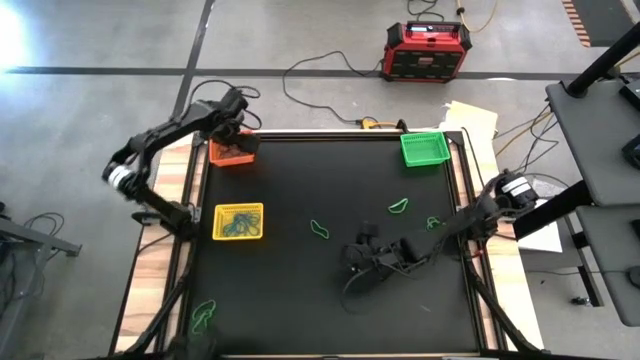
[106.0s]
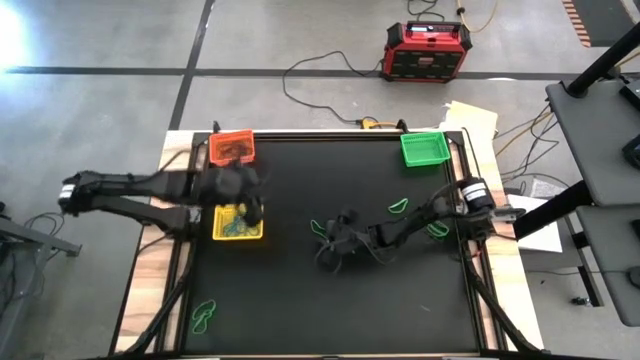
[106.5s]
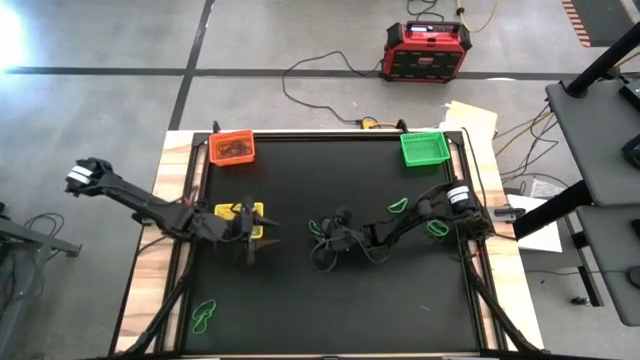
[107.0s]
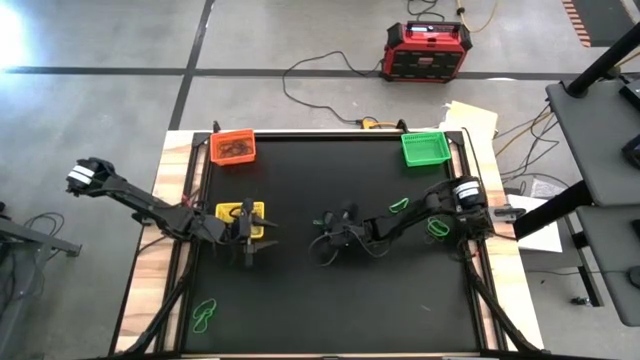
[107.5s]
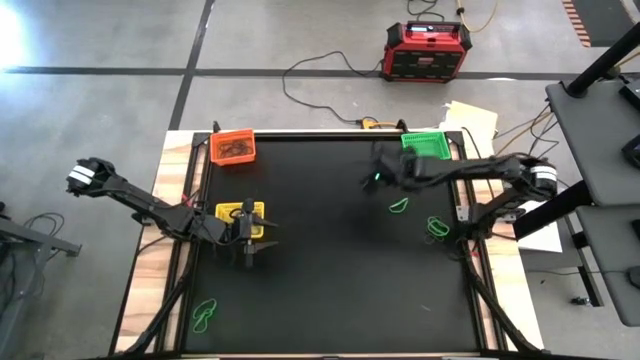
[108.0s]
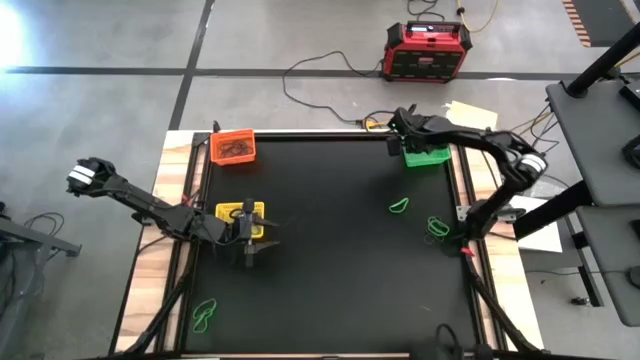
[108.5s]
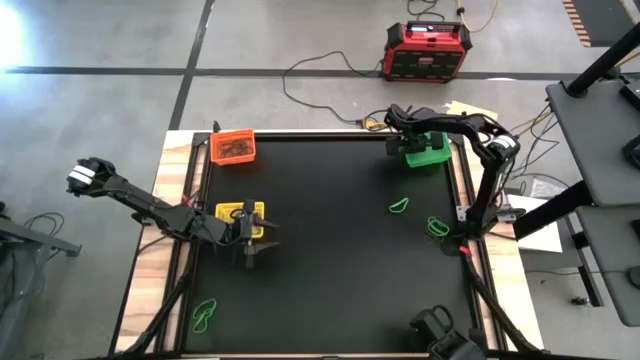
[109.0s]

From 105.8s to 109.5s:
Task: Sort rubber bands into baskets
Put the green rubber band into the green bin

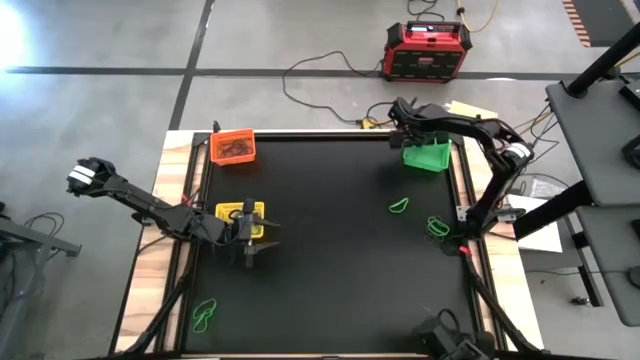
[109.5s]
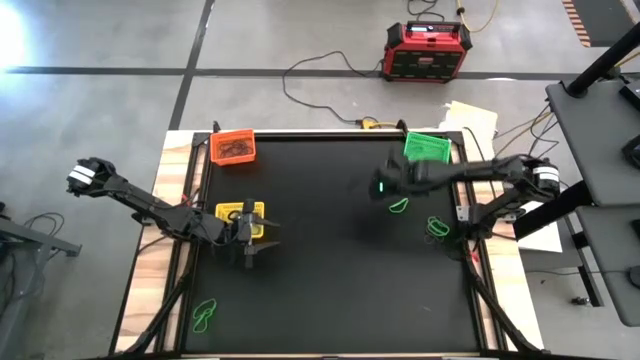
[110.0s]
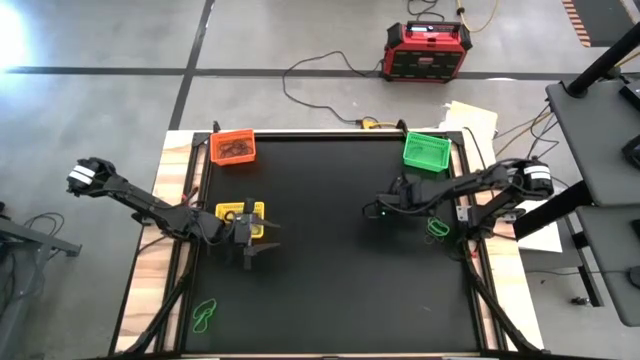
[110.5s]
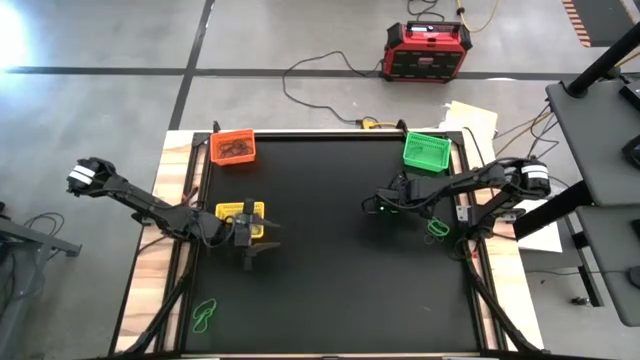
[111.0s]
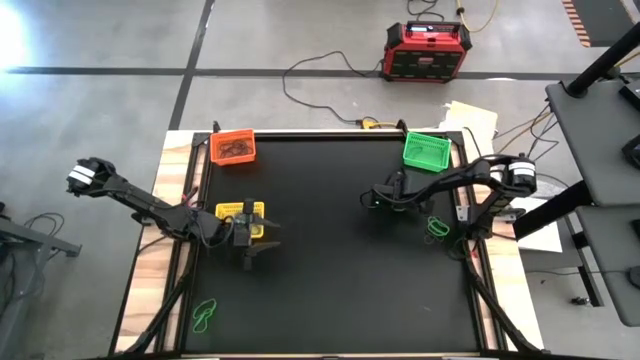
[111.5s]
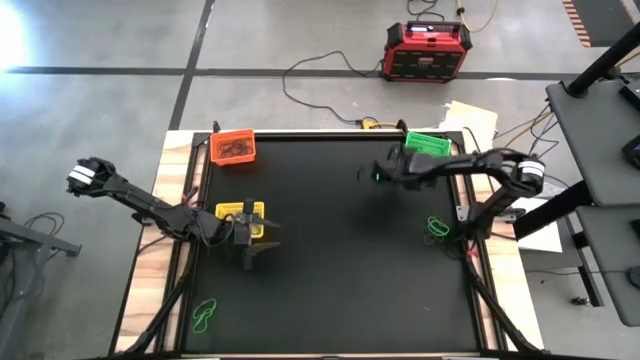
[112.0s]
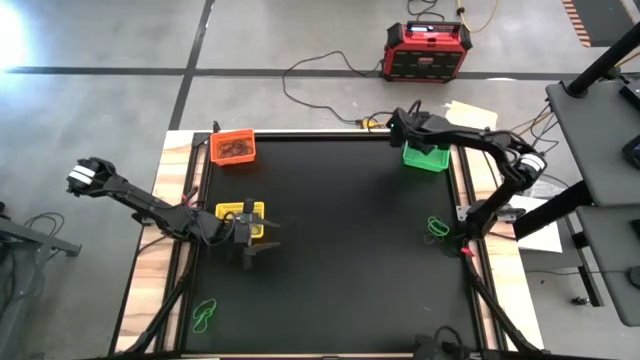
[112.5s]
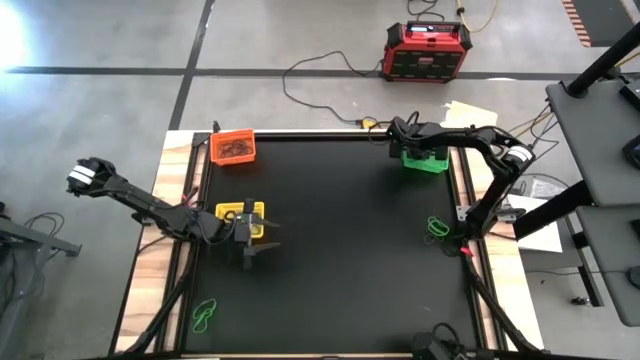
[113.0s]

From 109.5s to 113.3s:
Put the green rubber band into the green bin

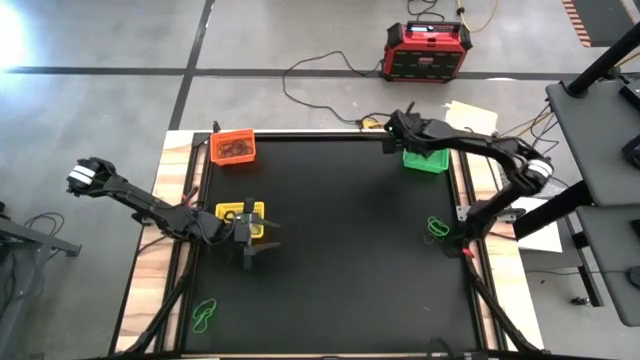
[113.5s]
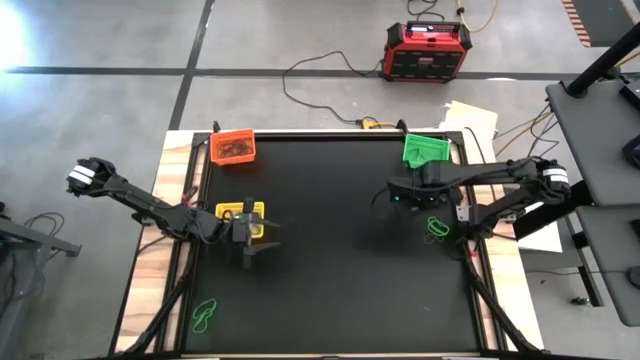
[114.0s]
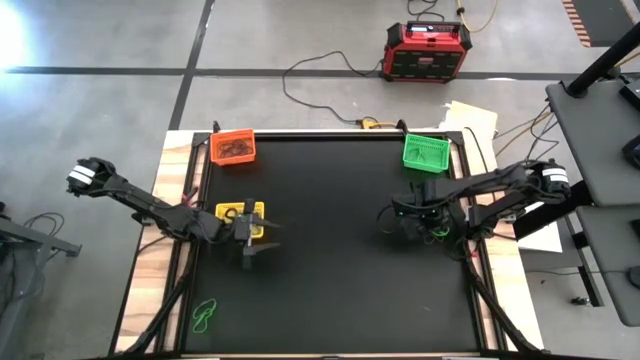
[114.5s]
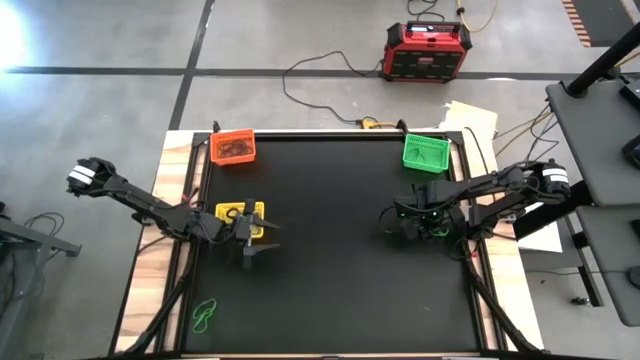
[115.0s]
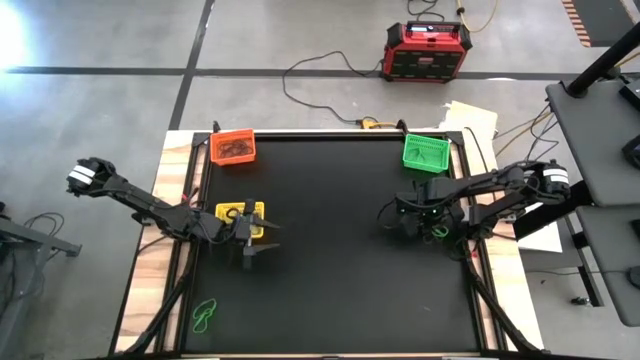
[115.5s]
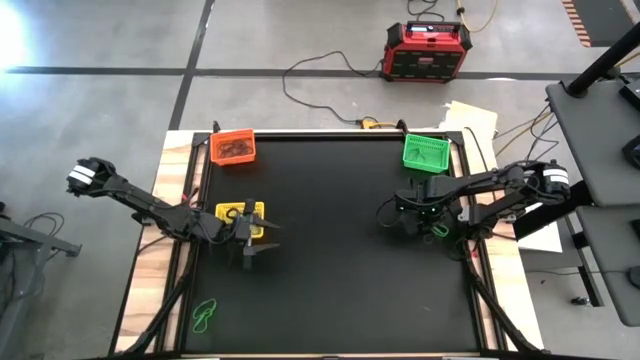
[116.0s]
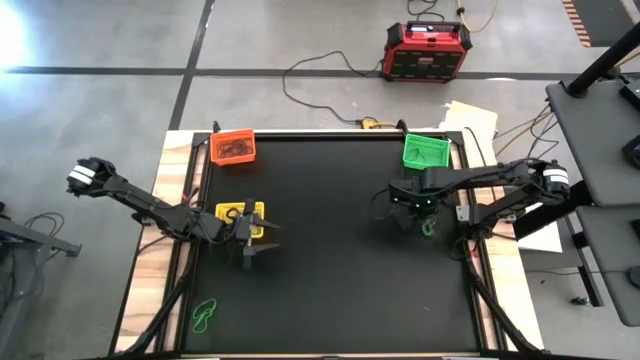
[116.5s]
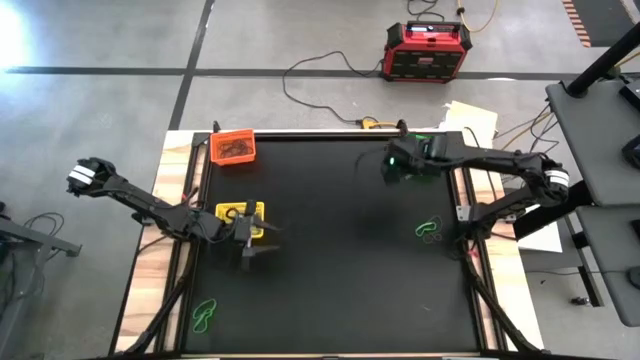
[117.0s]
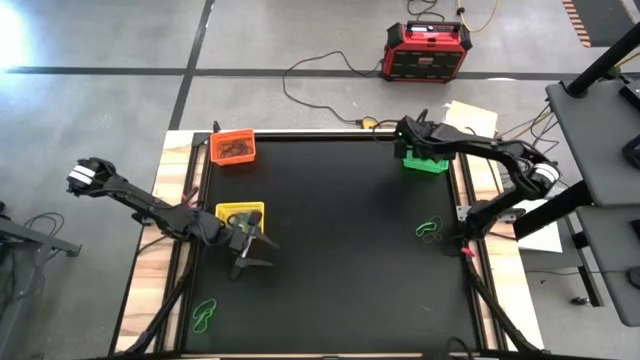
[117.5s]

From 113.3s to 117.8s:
Put the green rubber band into the green bin

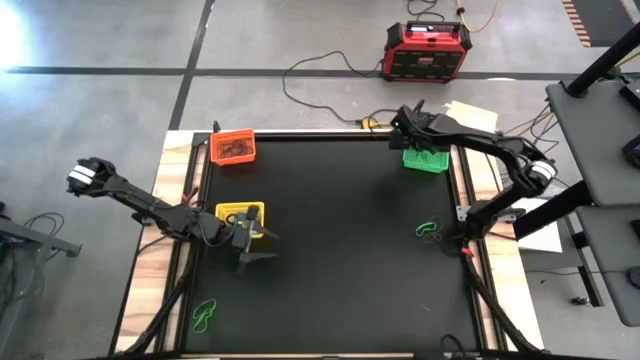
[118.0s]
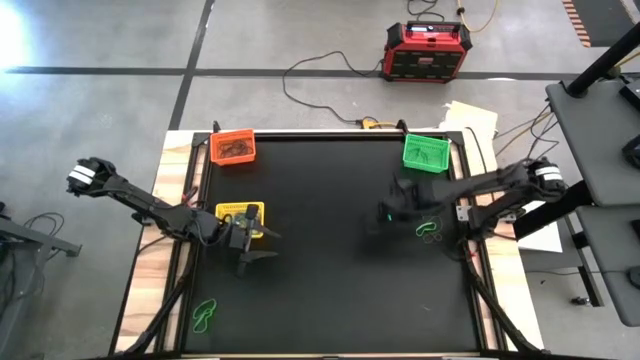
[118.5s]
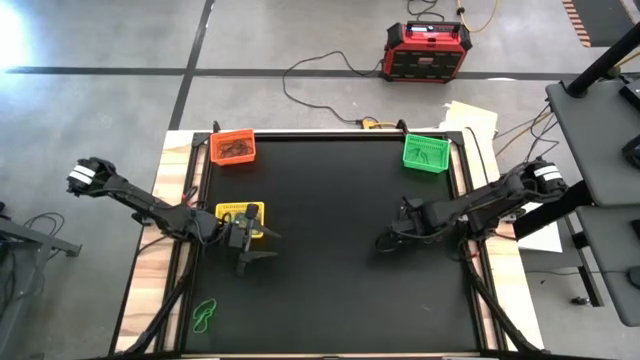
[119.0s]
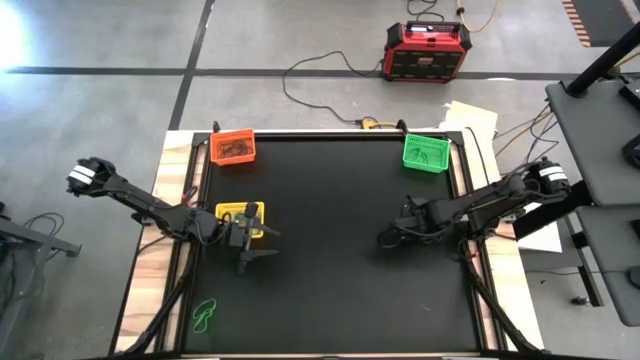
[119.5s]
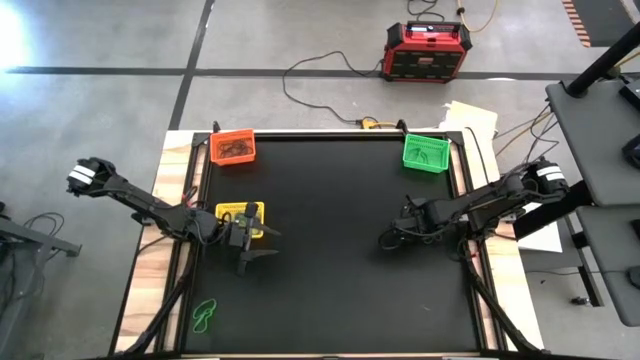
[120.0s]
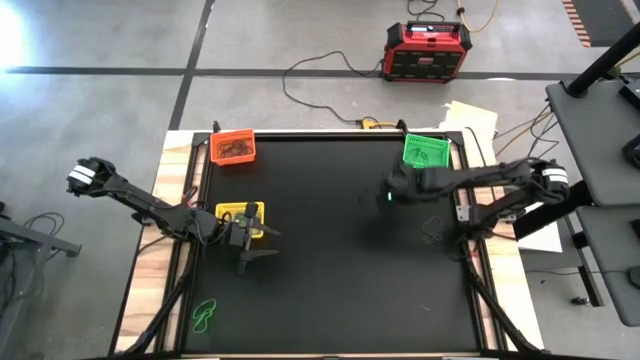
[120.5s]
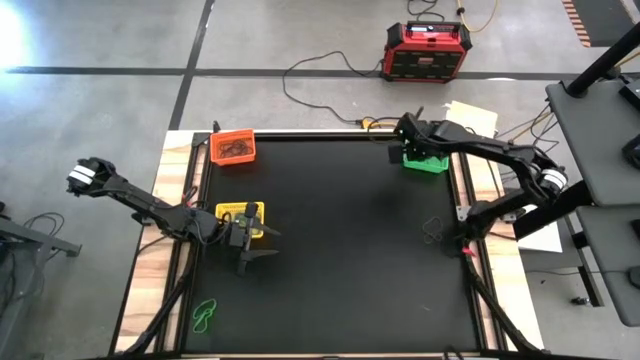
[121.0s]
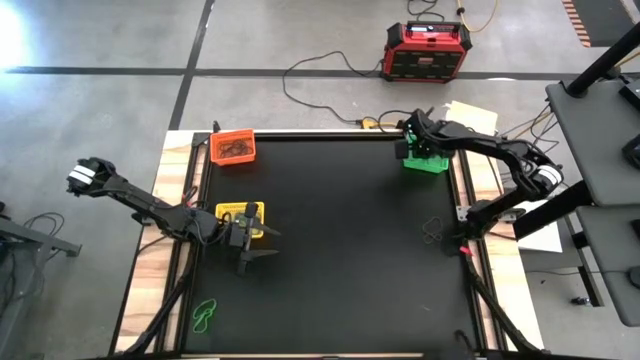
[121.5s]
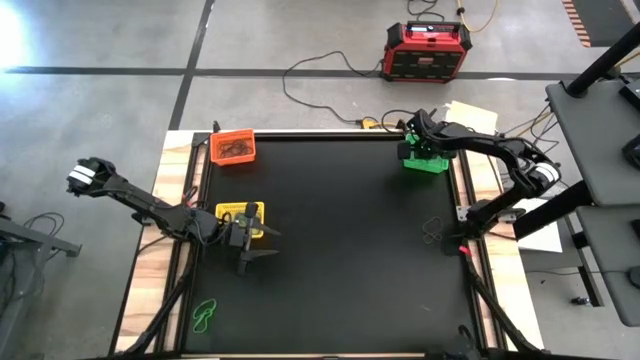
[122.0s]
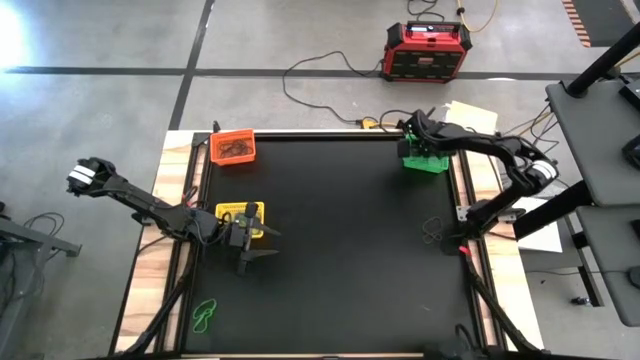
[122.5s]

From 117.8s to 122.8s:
Put the green rubber band into the green bin

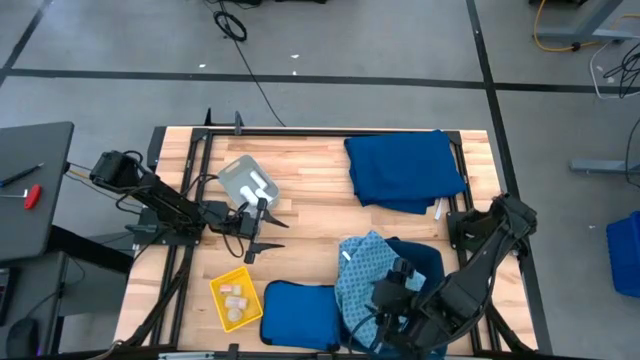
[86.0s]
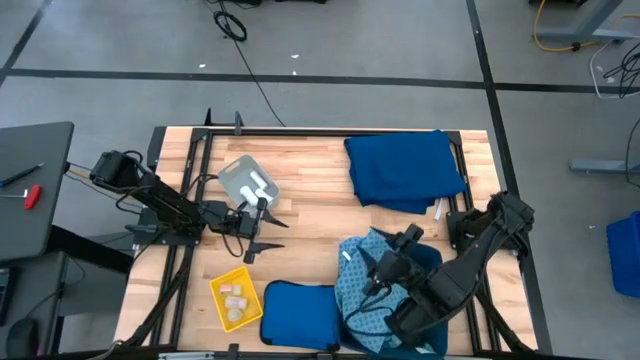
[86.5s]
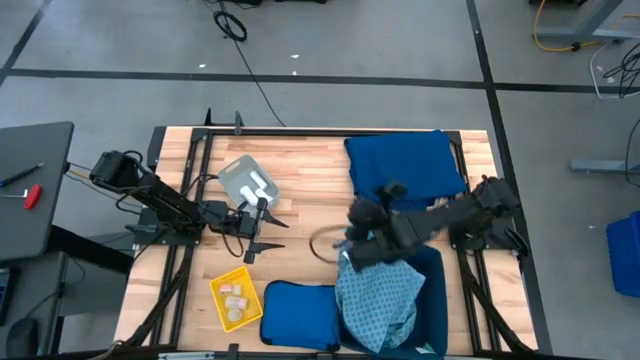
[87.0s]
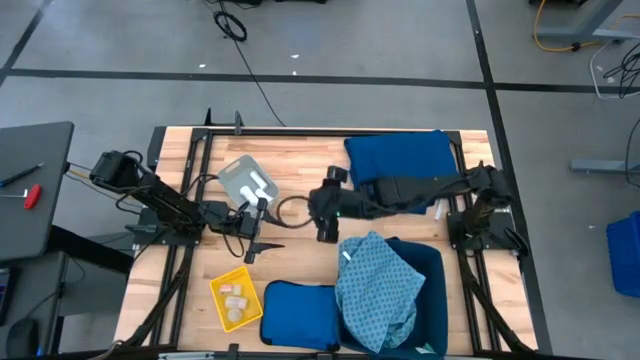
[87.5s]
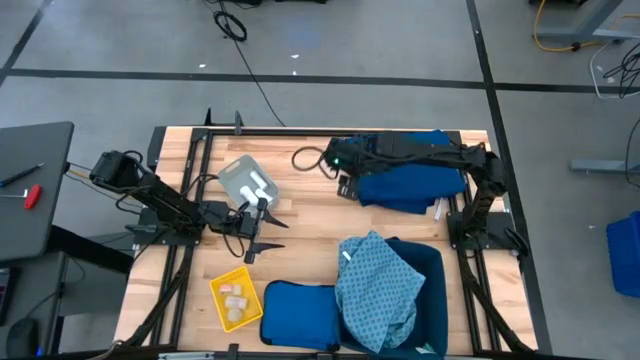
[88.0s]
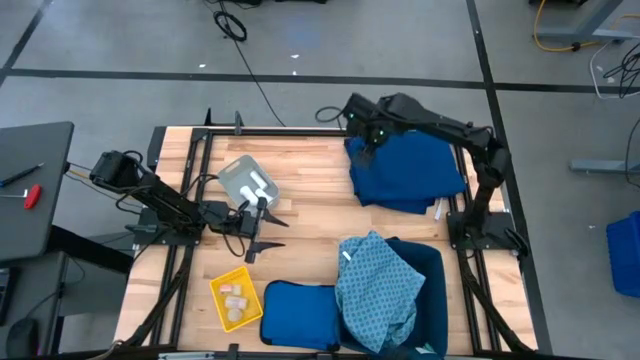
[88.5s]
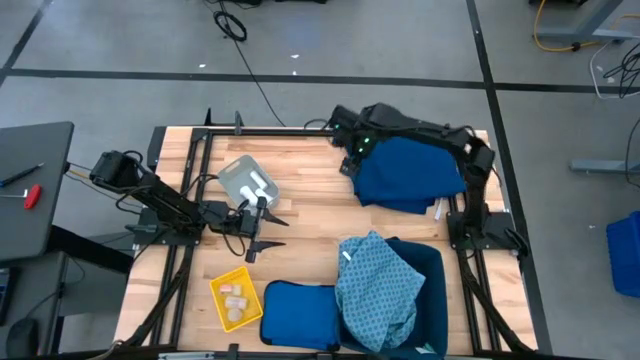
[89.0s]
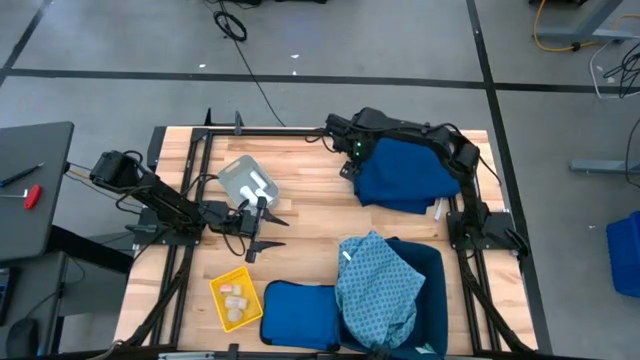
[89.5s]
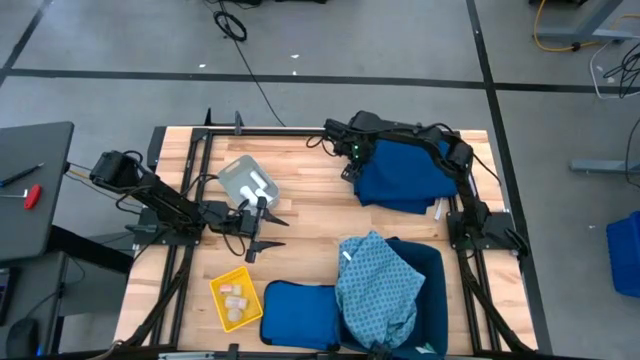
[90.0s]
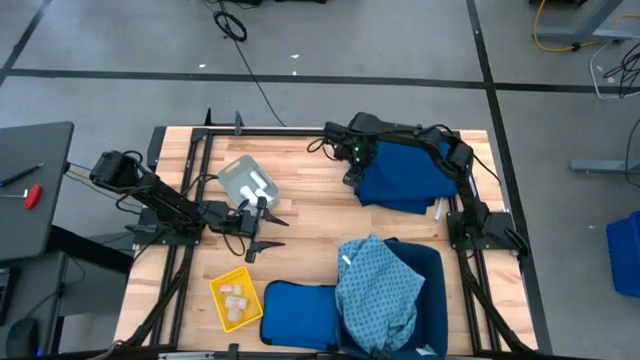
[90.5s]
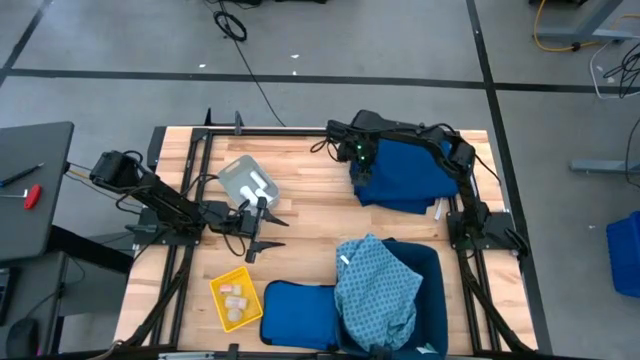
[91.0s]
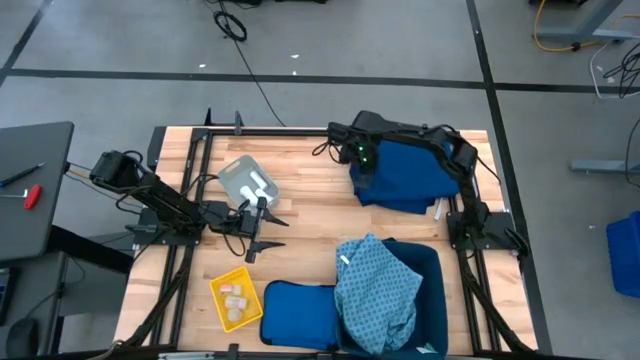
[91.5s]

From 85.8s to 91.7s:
Task: Pick & place medical supplies in basket/bin
Put the blue patient gown into the blue laundry bin
